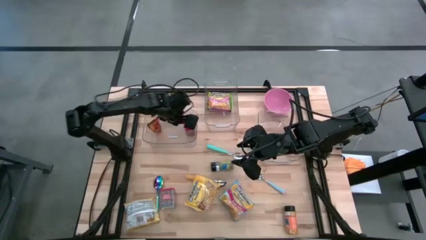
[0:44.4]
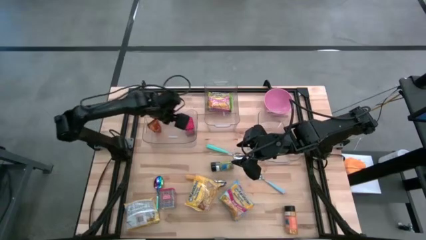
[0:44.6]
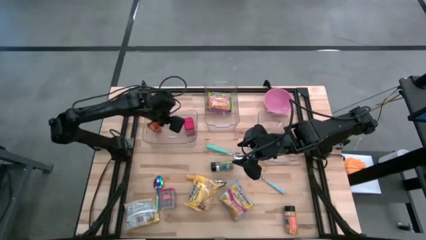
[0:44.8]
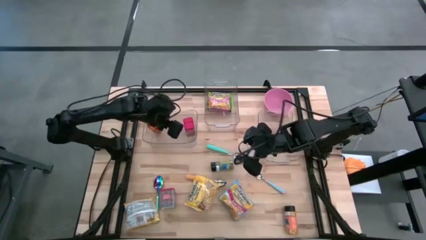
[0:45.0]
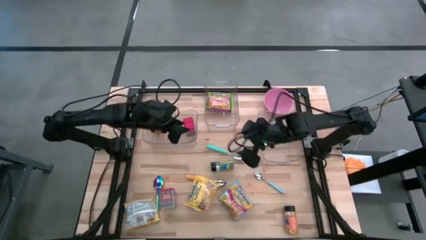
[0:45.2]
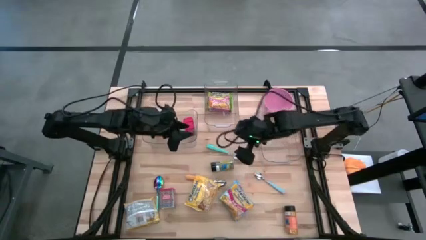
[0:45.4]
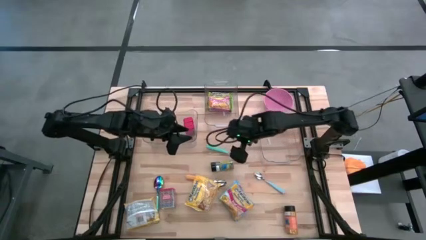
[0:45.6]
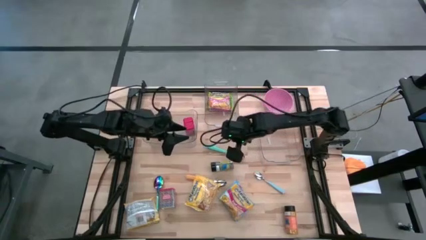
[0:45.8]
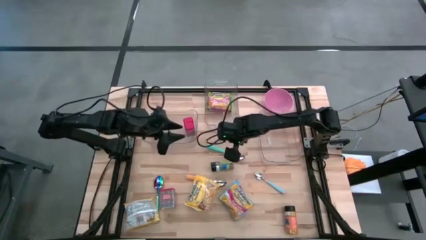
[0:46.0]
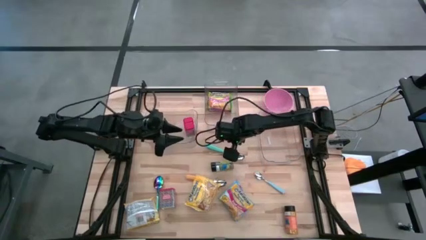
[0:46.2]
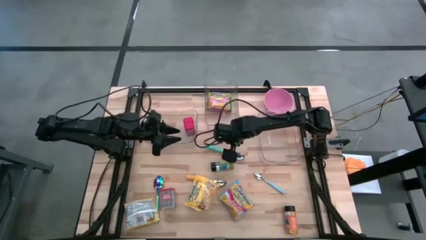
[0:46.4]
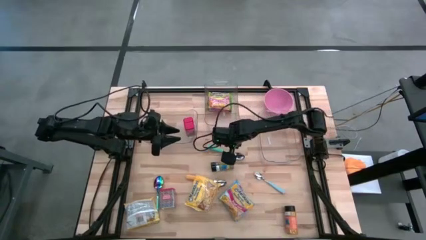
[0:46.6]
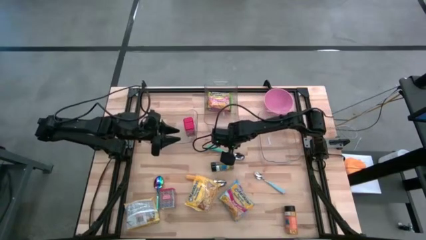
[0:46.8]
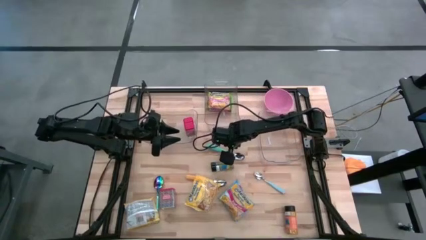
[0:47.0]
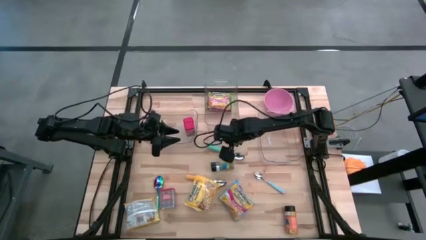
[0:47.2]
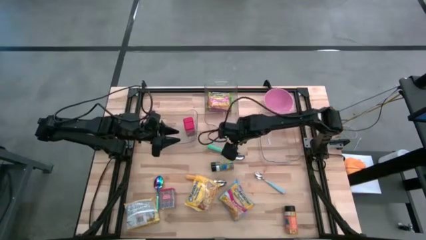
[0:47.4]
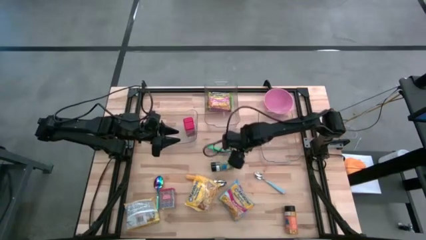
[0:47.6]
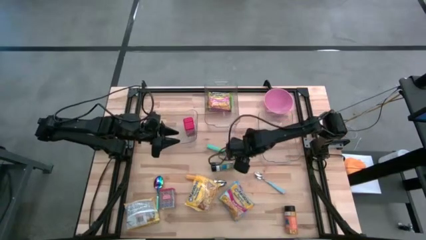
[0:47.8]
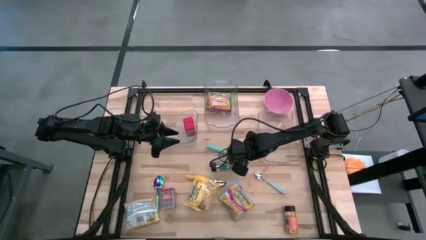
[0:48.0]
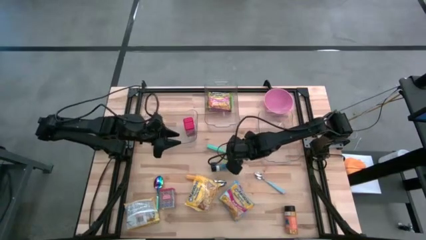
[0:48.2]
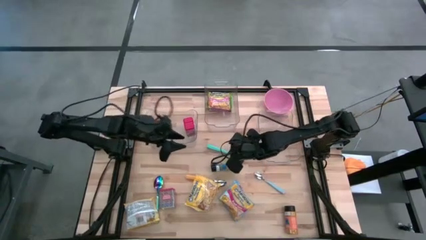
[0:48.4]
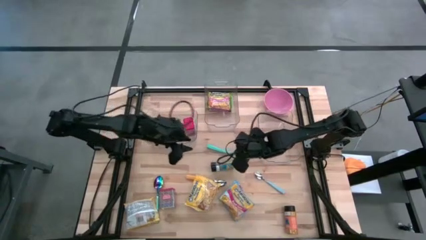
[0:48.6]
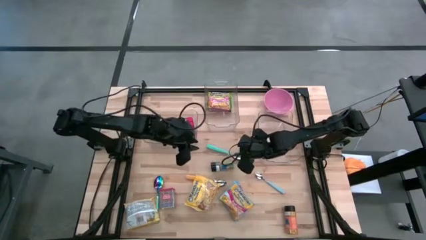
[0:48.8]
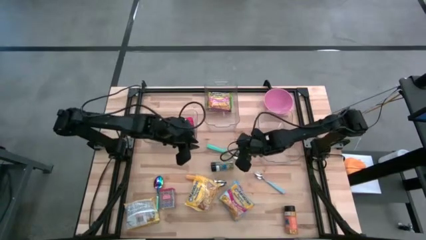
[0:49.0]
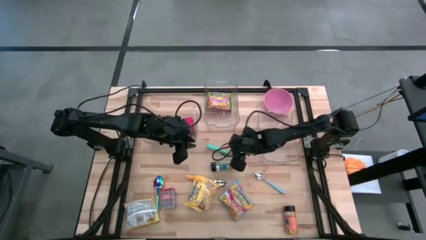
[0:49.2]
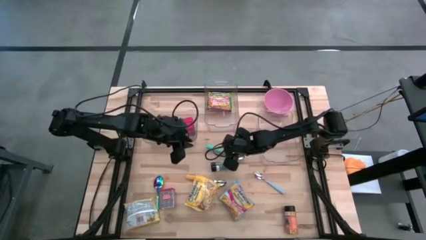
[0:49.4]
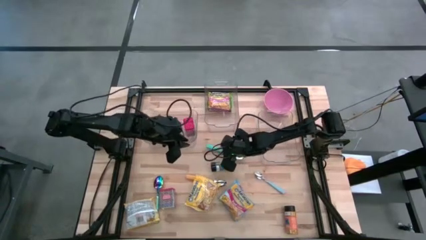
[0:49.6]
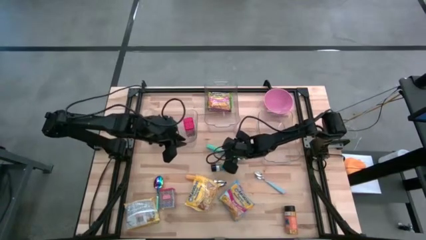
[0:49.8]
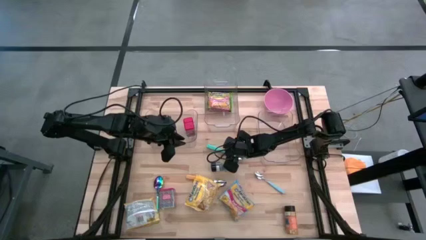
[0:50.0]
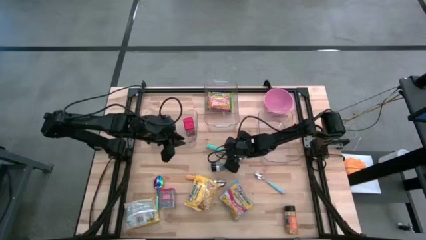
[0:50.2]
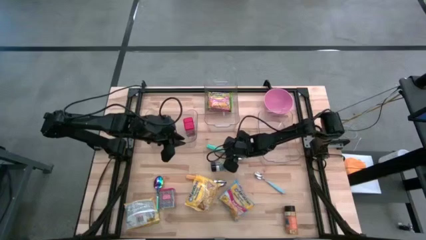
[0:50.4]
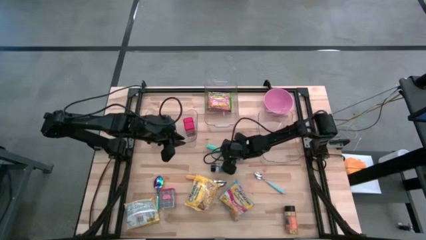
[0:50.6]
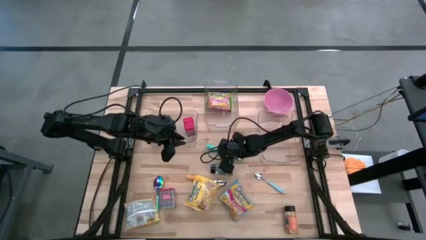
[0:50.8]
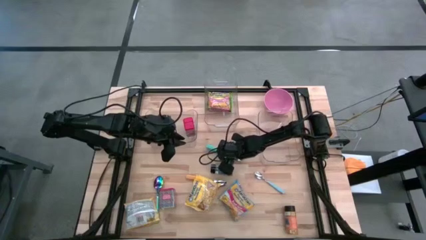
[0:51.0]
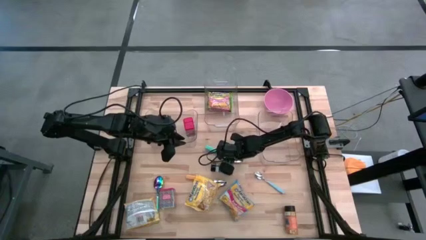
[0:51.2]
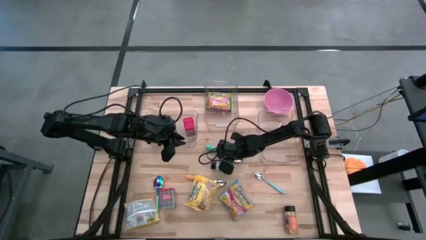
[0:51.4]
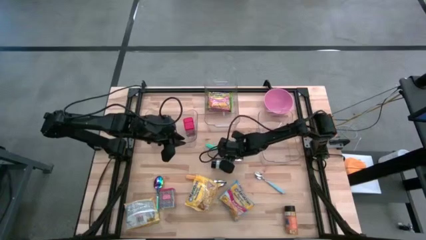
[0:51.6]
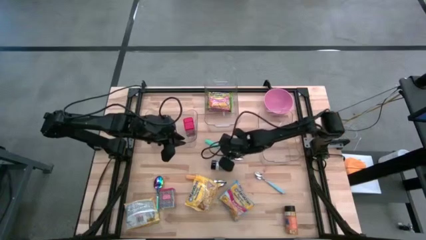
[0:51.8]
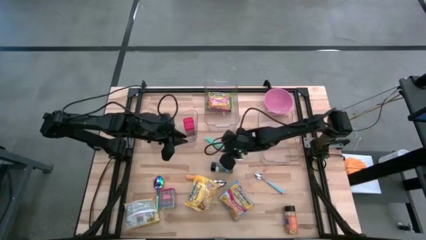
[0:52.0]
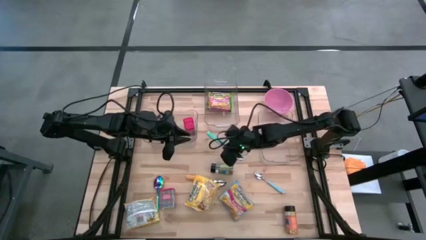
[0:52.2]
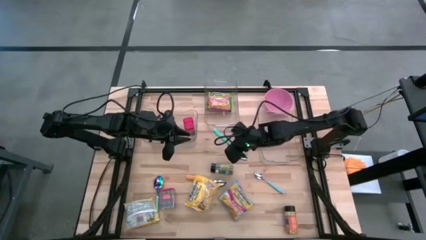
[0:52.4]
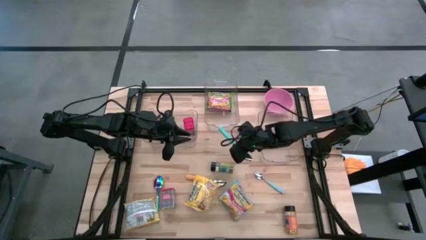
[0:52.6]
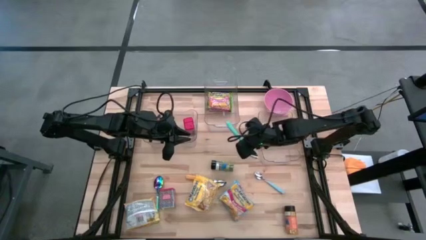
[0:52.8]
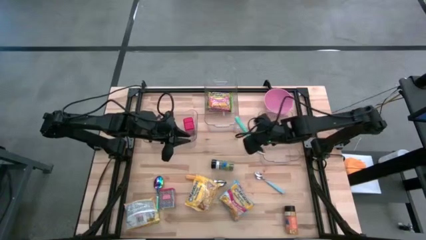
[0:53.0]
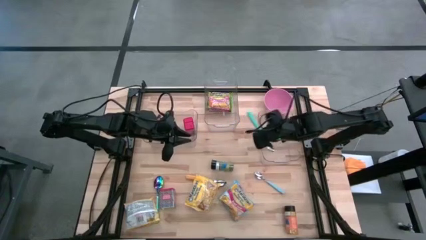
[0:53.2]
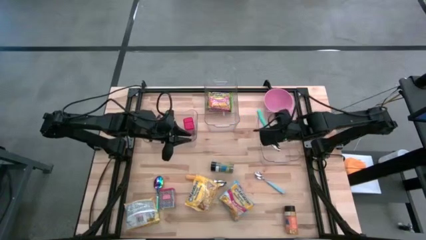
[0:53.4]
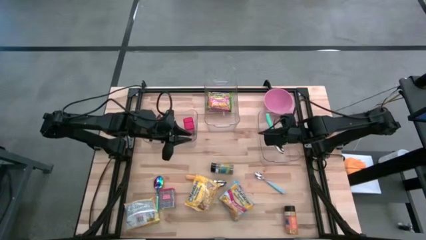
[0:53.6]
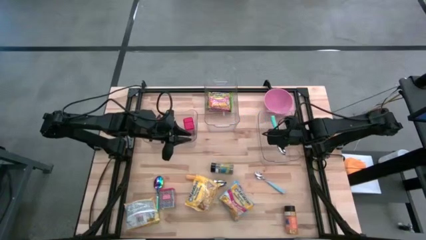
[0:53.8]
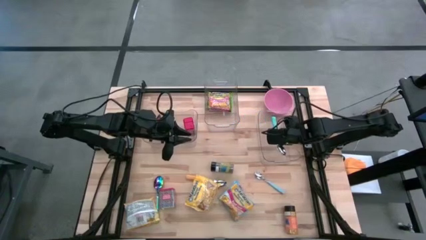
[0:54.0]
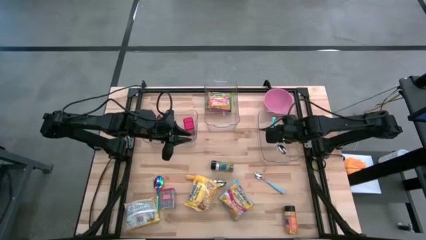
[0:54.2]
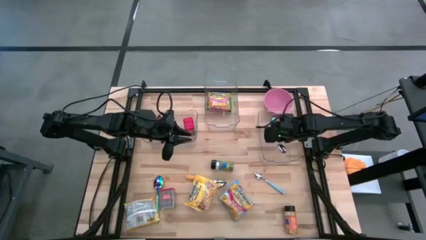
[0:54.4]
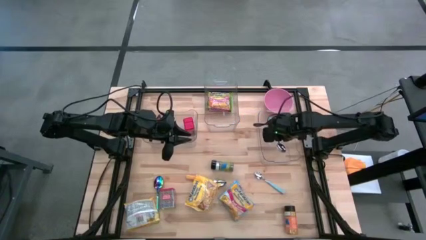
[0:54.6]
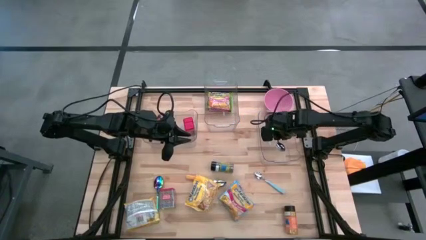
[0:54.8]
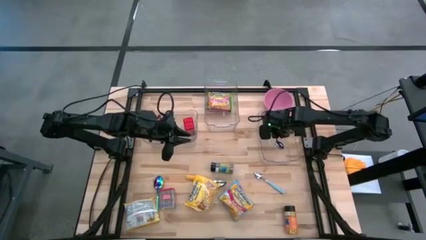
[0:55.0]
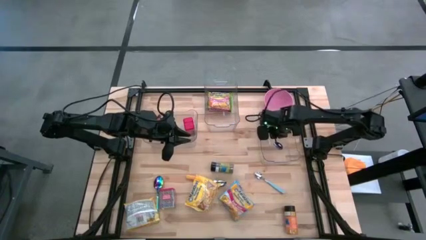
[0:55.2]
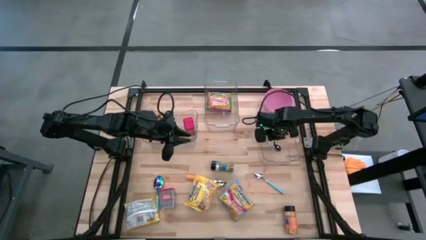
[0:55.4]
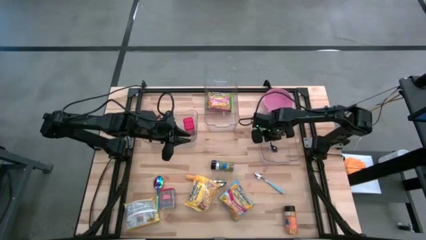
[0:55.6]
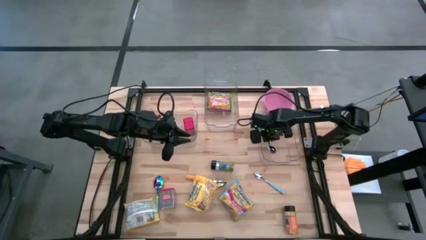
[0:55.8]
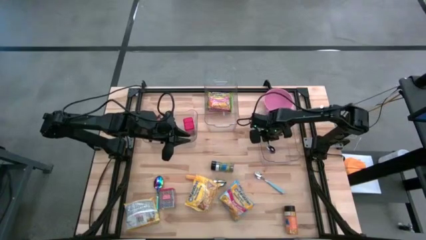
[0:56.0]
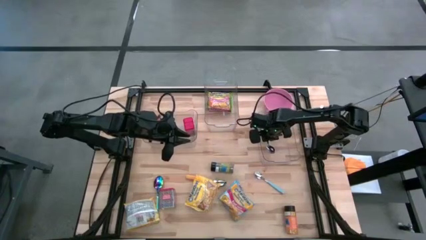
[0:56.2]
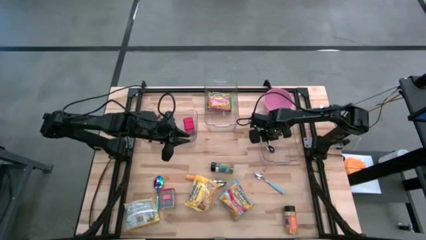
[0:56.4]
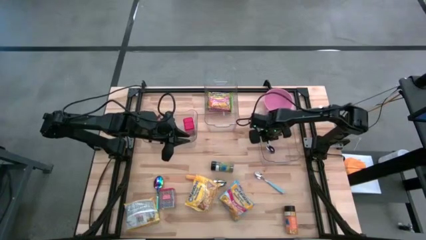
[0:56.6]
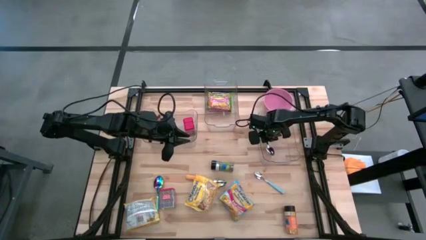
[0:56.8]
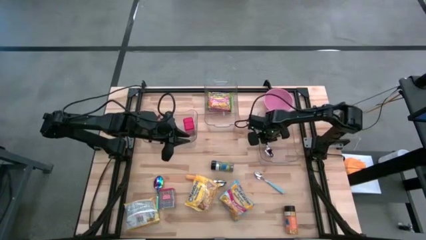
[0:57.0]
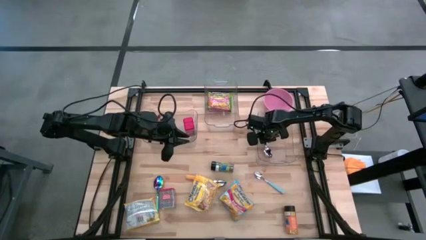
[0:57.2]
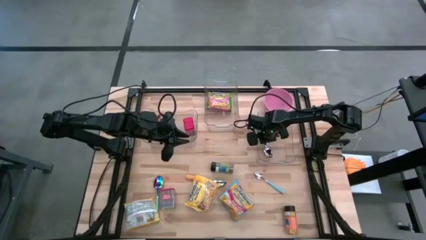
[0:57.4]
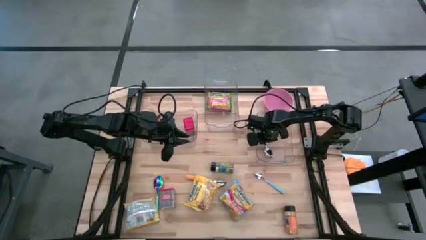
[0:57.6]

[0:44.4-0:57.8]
Put the top blue spoon into the right transparent bin
